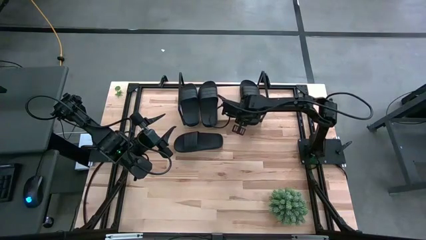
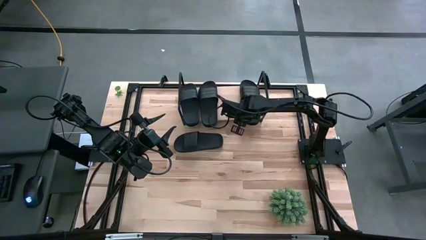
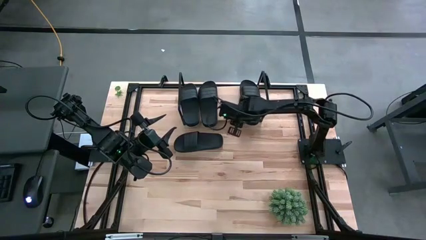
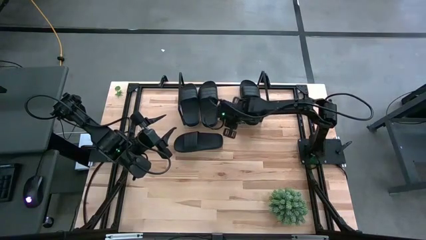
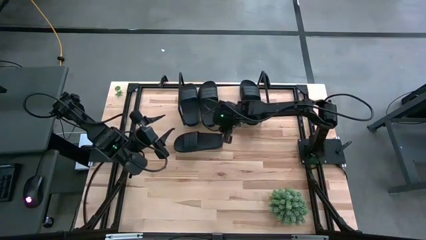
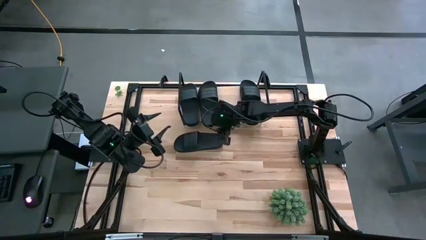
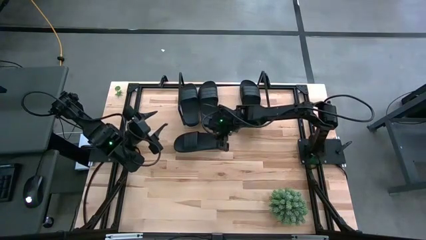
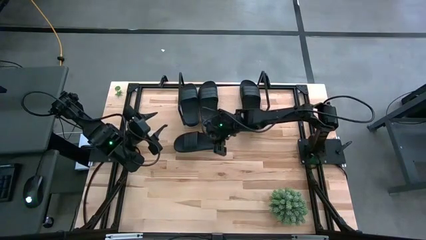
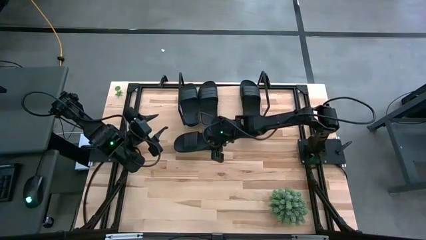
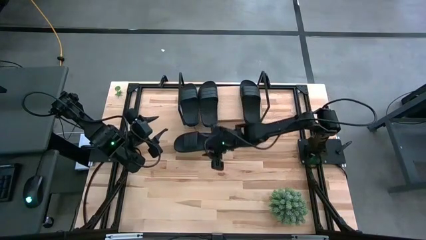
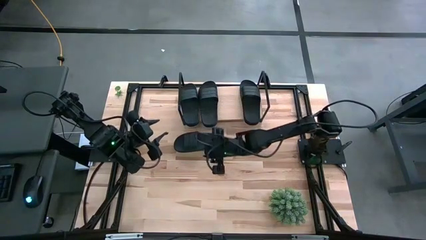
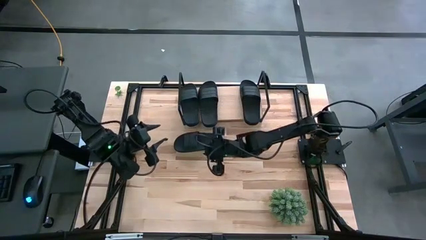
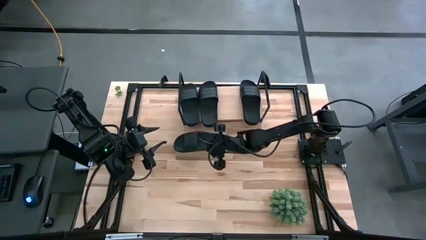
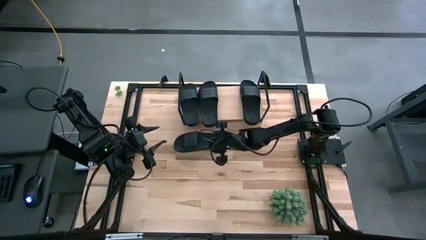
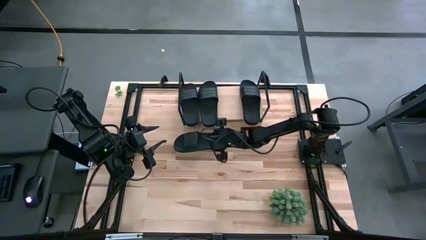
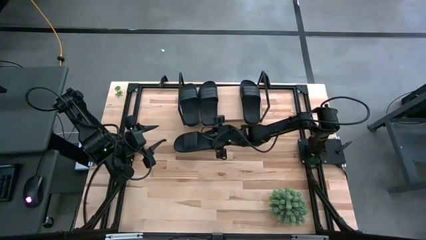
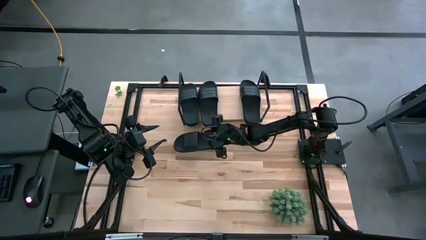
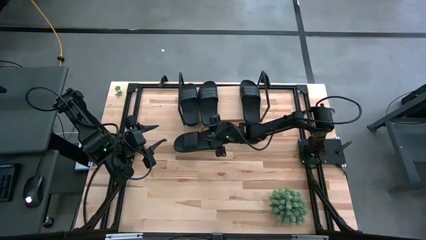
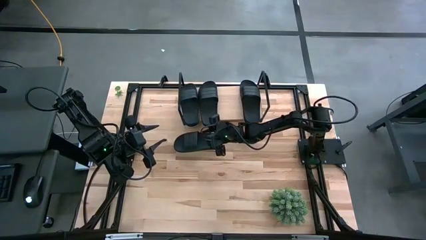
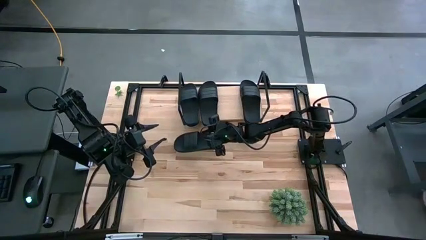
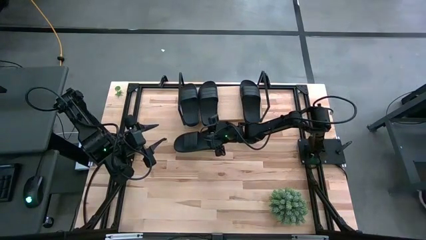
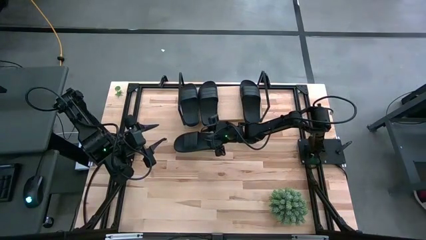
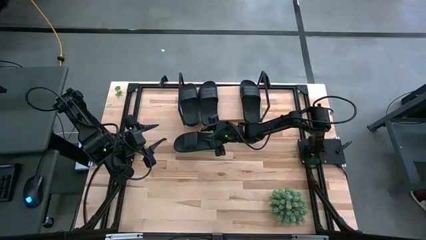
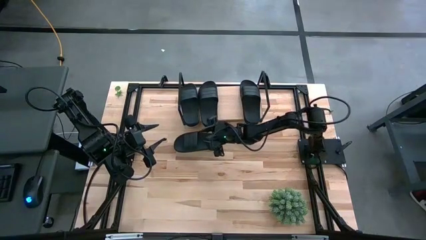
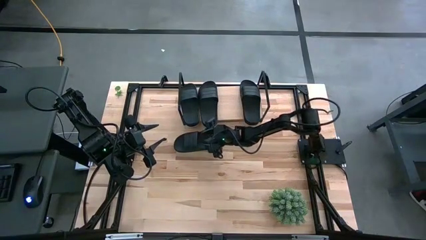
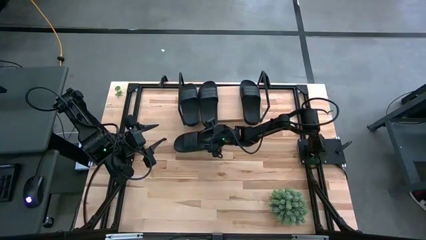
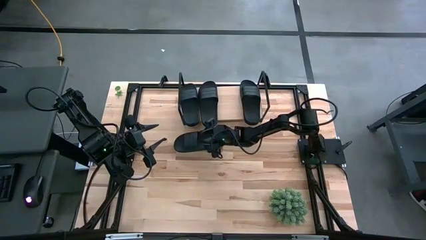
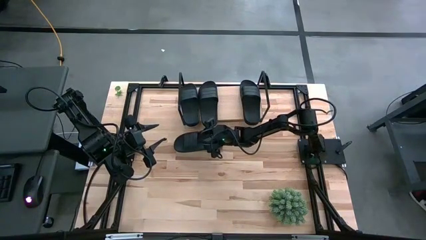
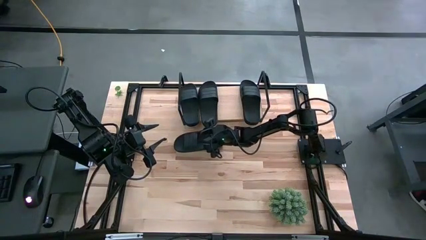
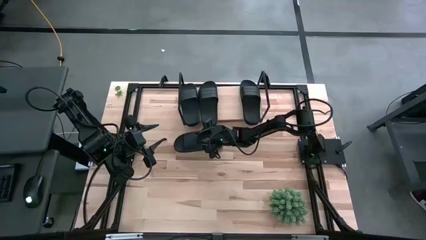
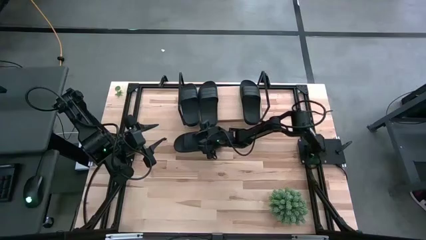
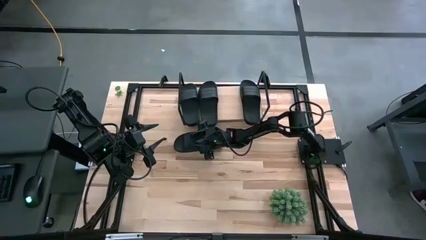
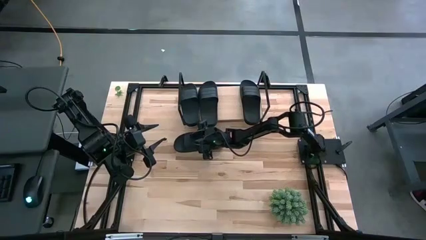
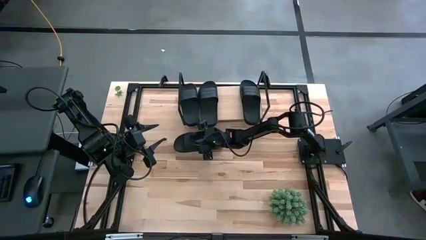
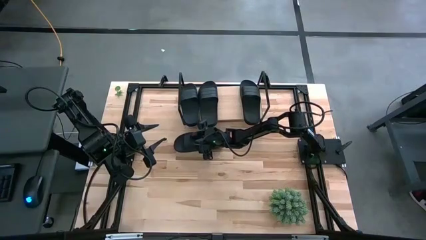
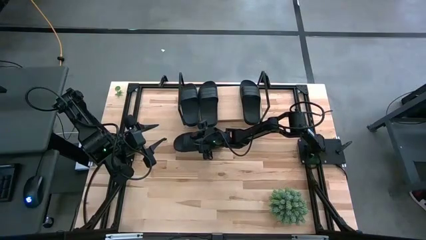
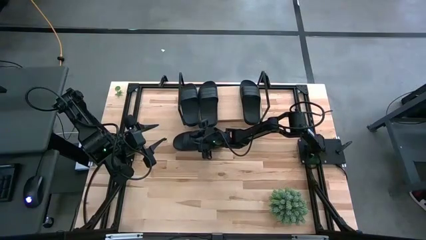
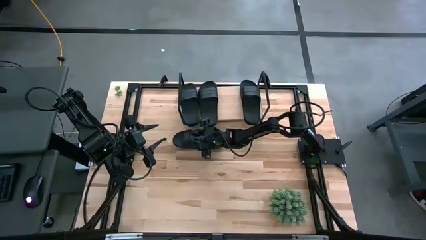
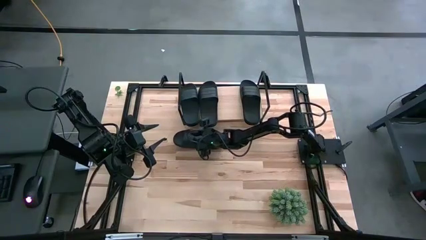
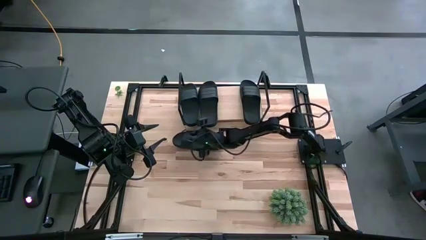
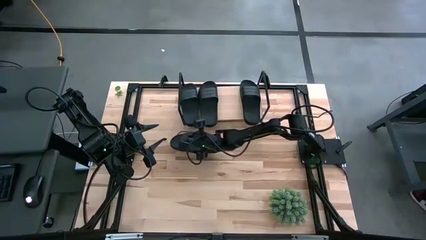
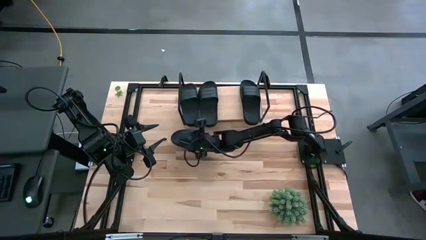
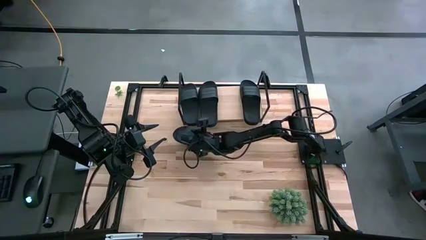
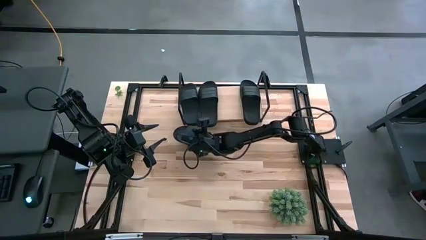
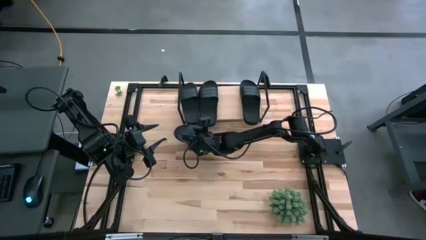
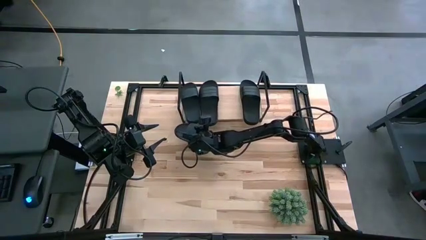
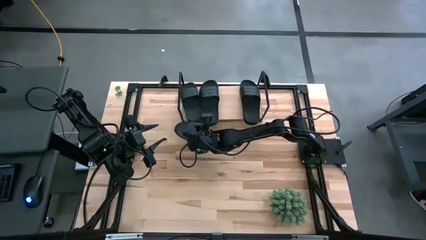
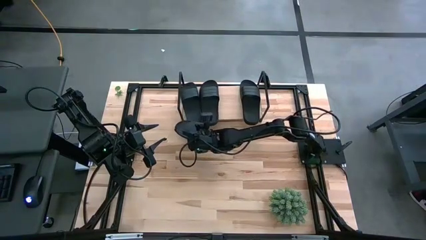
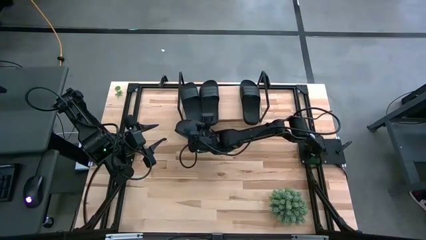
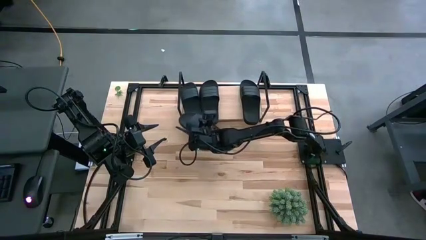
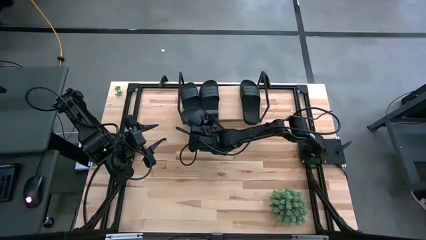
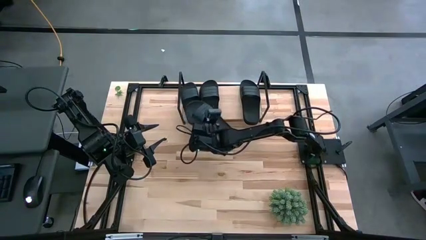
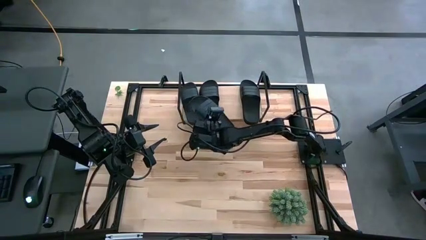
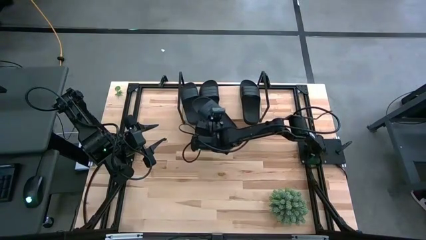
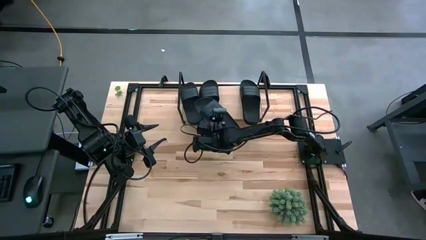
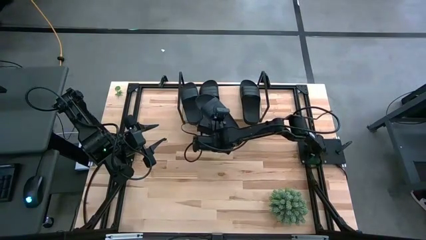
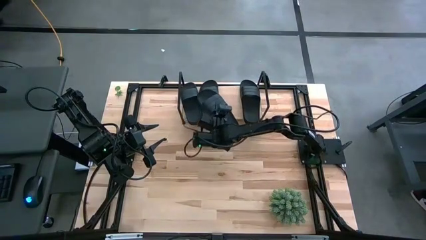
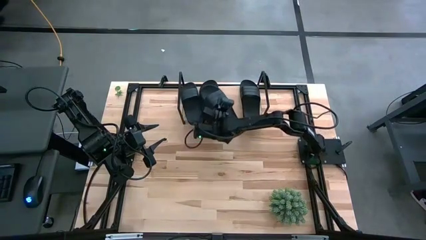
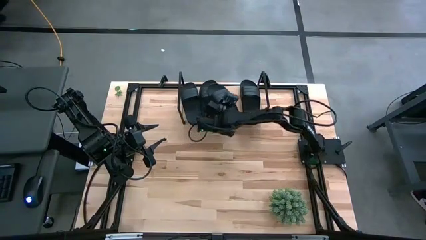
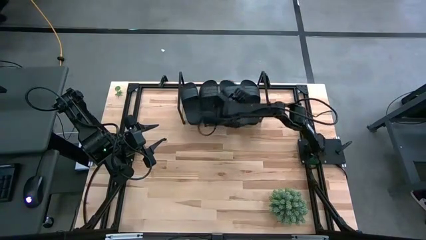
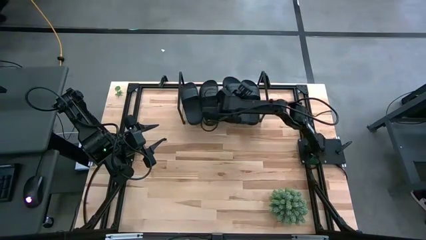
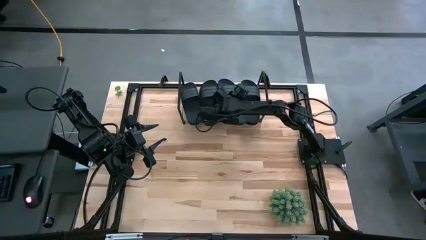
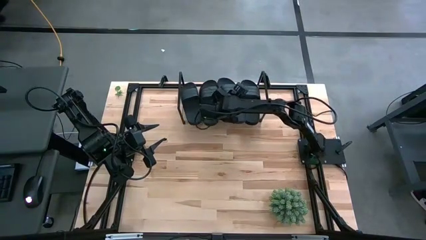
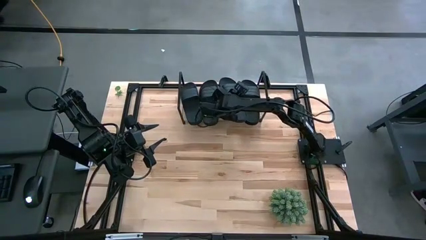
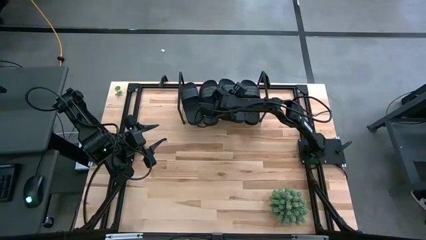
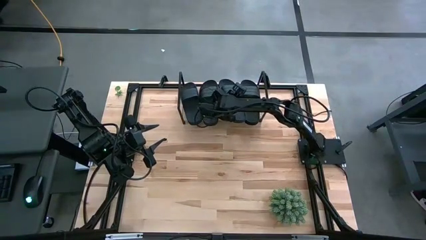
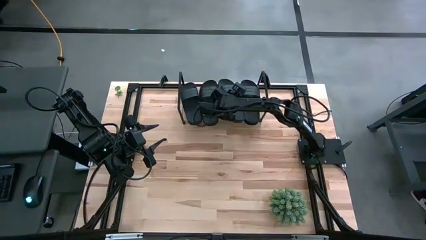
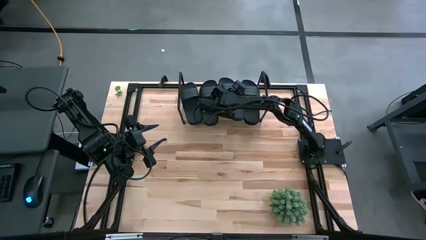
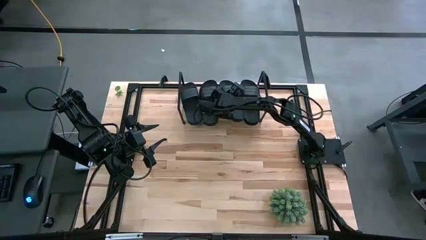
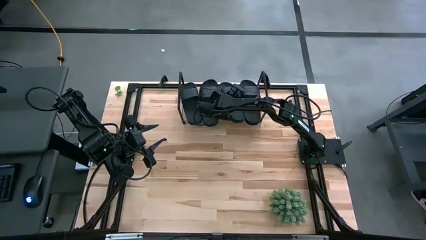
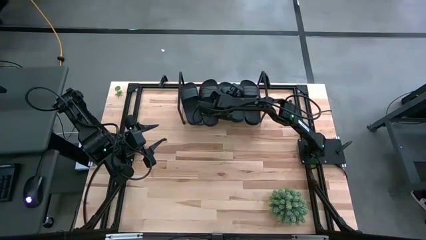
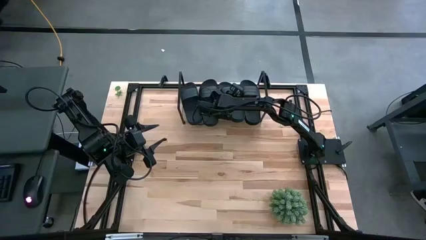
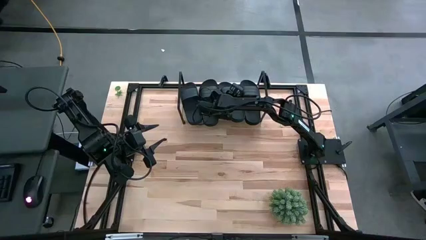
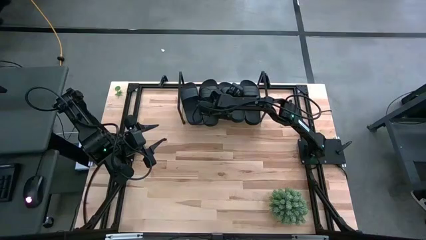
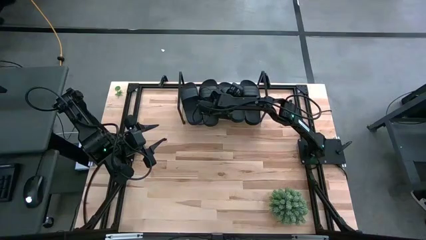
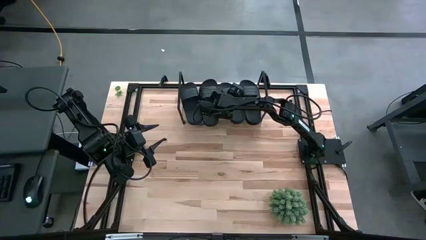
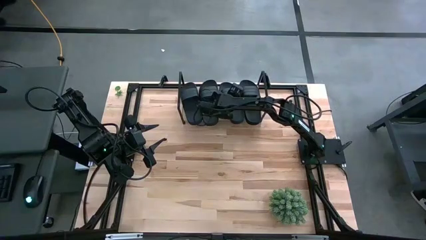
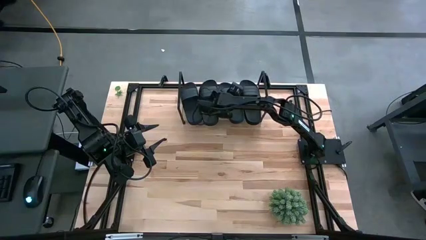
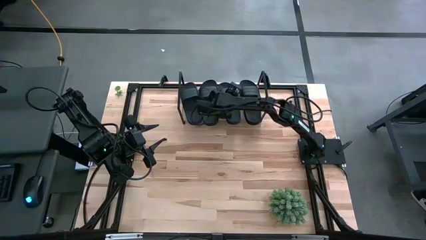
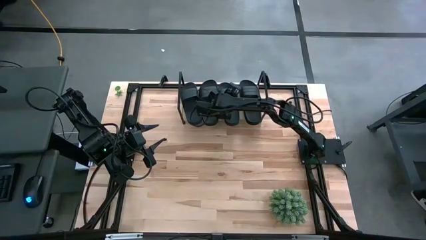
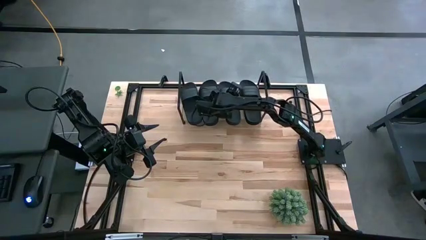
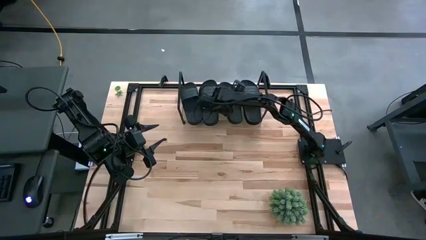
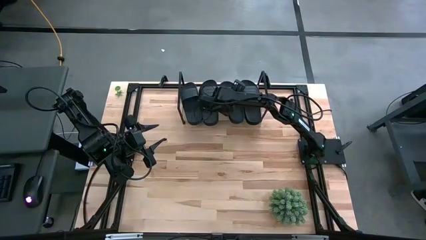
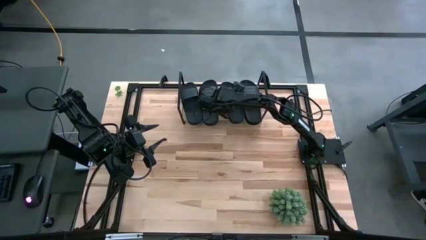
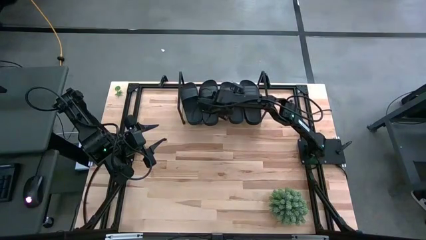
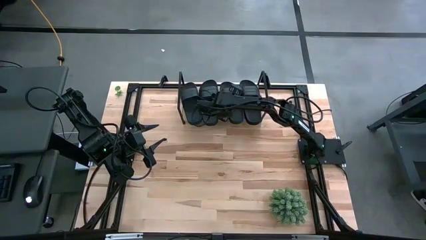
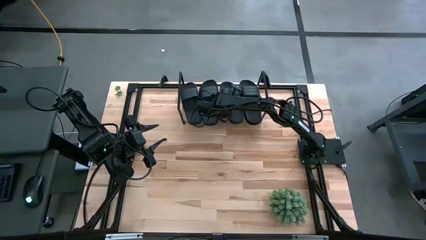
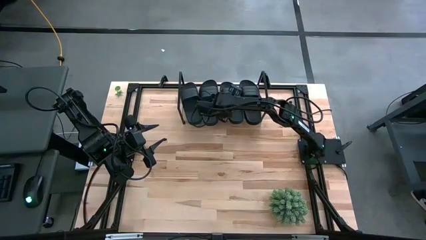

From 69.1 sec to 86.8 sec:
Task: Pick and place slides into the shelf
Put the black slipper on the shelf
